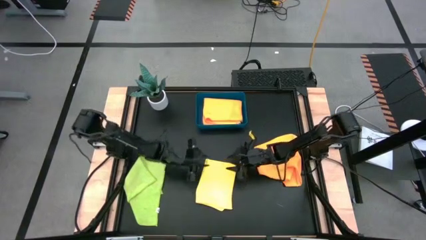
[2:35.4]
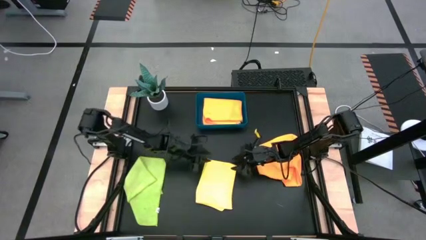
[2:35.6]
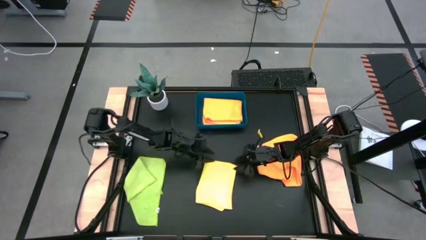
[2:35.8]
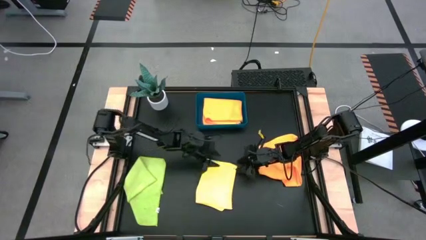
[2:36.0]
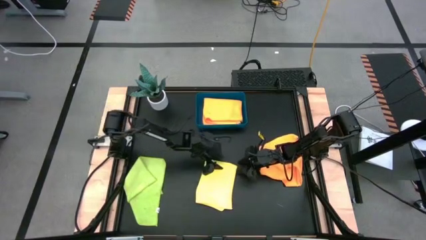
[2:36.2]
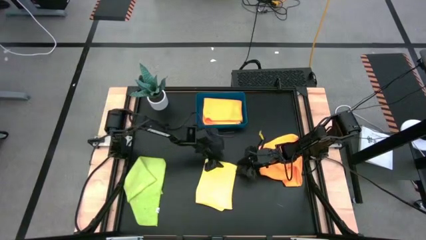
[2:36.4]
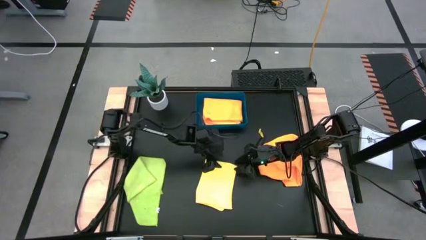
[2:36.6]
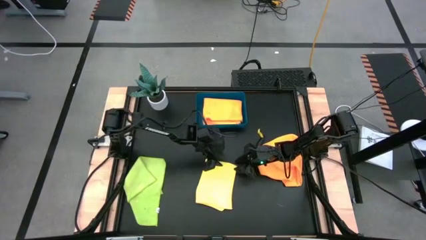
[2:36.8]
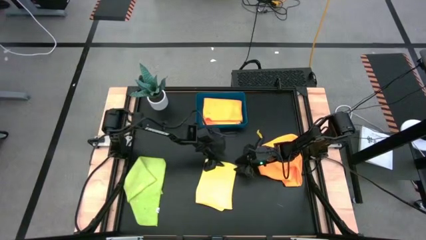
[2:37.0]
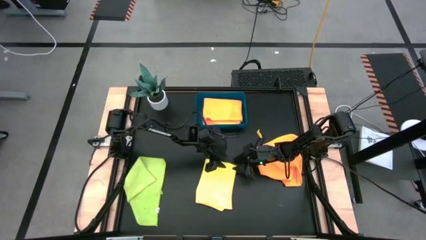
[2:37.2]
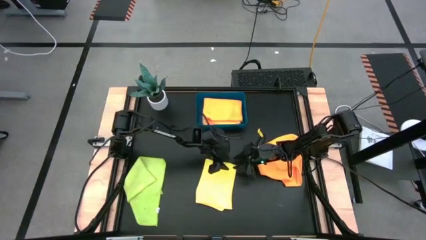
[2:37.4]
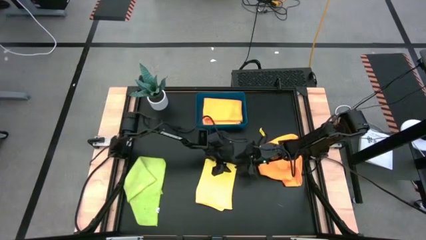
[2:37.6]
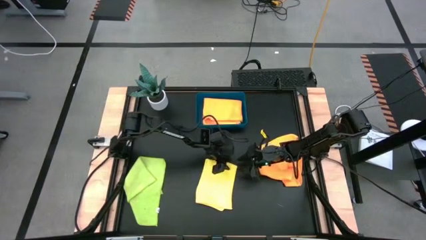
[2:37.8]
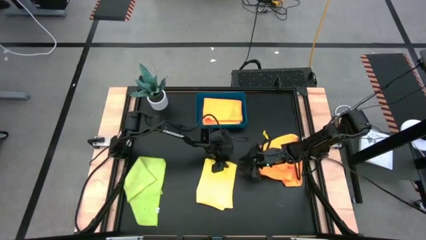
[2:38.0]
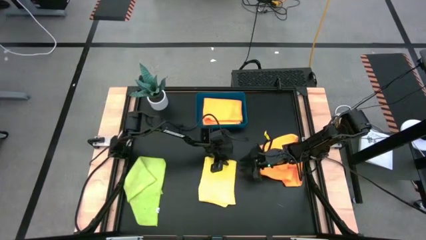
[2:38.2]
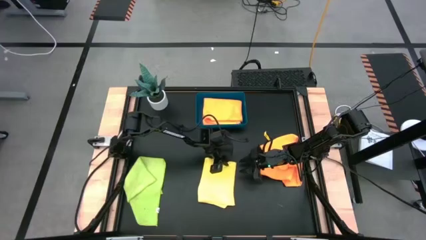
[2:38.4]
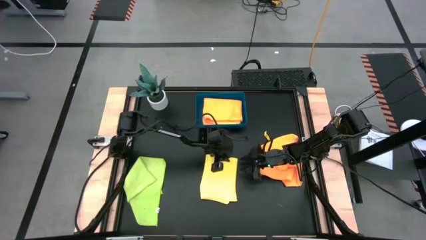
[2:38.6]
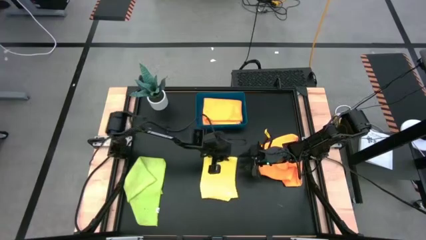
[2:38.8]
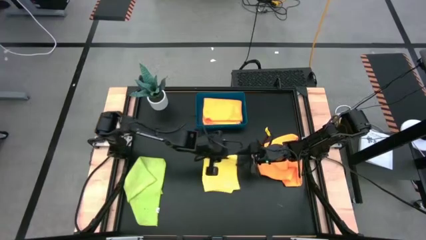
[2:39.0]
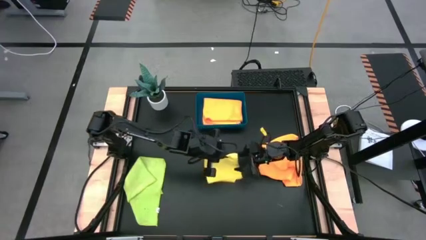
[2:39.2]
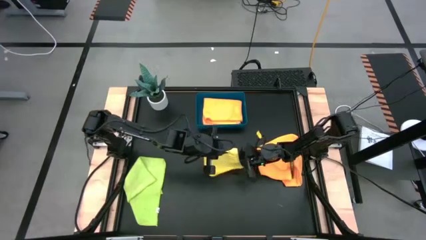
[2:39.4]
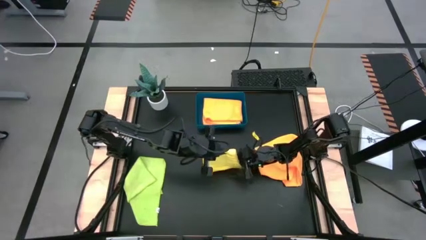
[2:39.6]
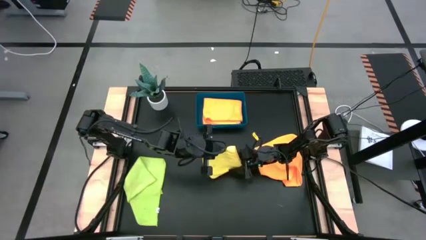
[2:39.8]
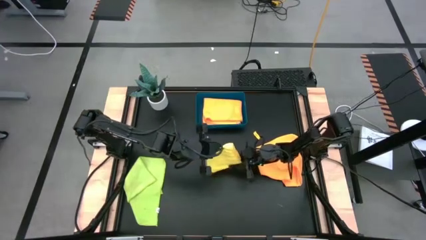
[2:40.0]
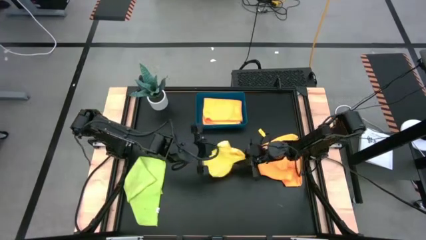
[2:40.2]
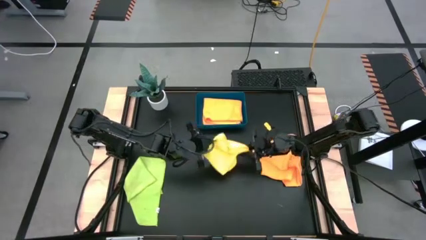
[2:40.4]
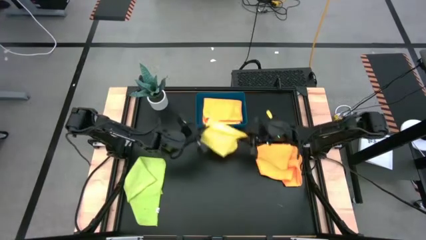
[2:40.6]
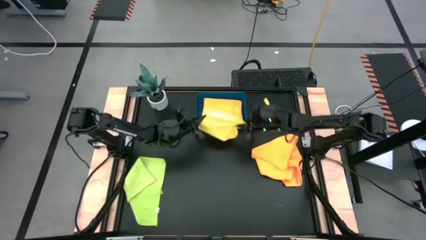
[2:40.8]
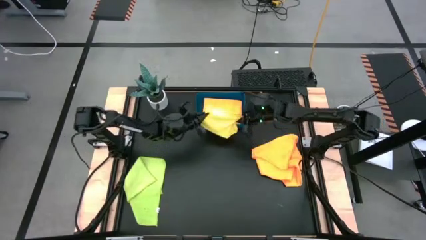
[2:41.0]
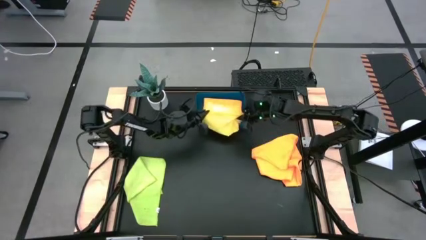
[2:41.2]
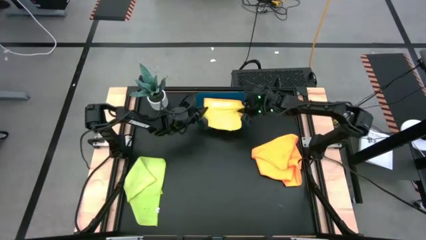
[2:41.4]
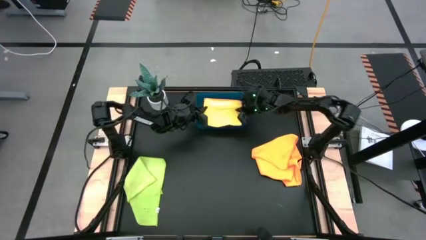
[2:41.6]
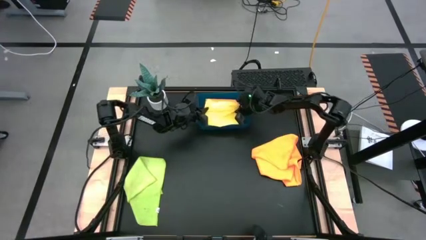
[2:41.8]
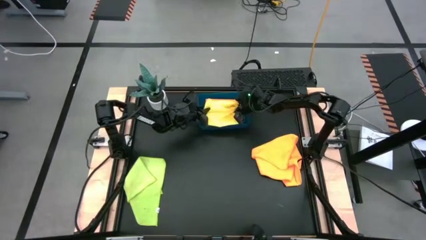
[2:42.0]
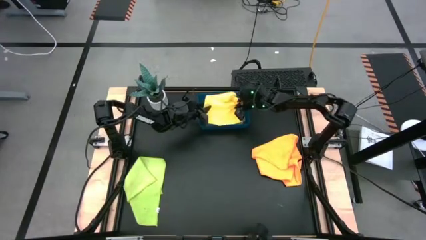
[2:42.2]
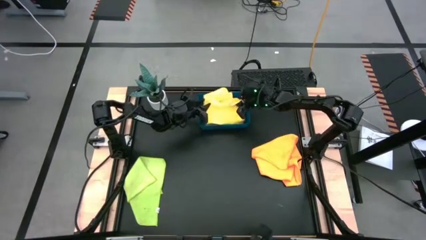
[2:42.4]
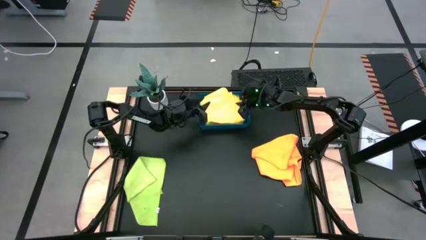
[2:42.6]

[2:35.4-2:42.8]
Task: Fold microfiber towels
Put the yellow microfiber cloth into the blue bin

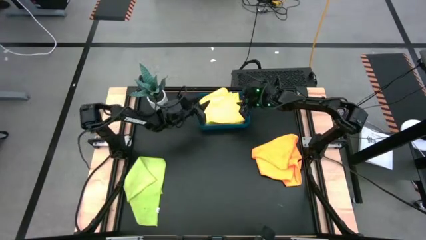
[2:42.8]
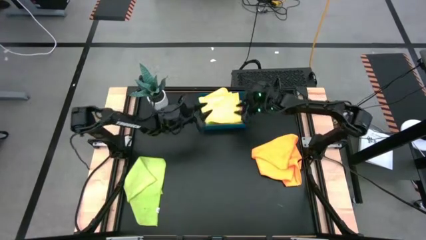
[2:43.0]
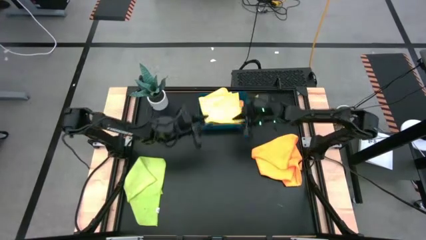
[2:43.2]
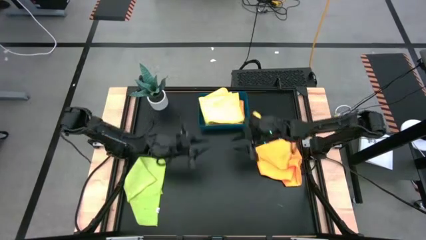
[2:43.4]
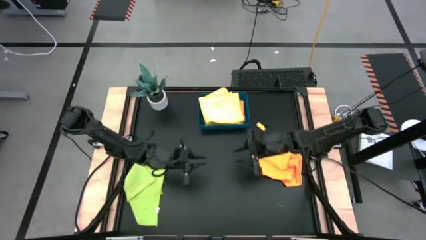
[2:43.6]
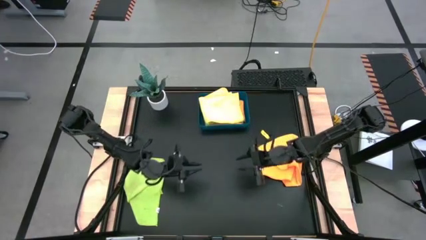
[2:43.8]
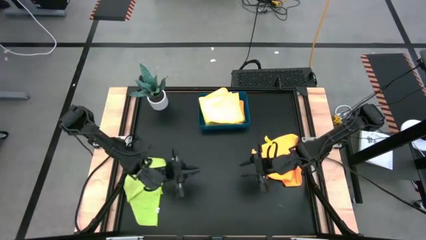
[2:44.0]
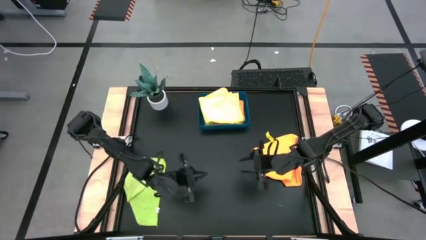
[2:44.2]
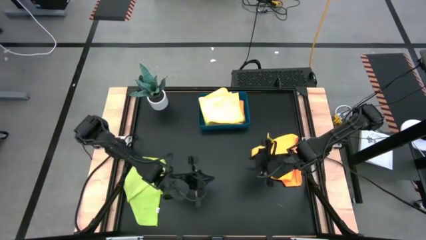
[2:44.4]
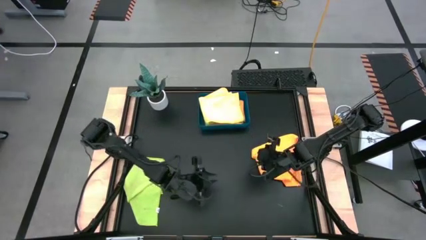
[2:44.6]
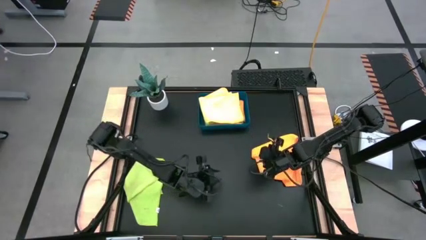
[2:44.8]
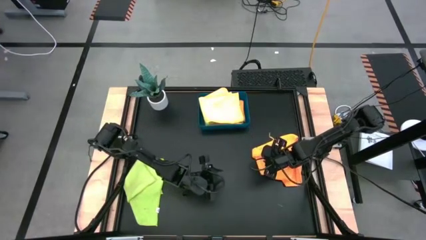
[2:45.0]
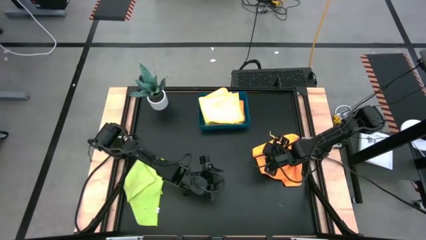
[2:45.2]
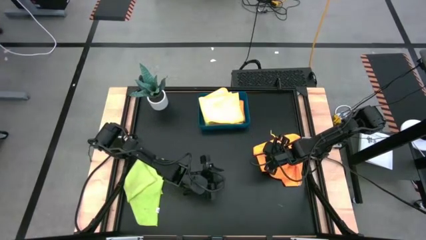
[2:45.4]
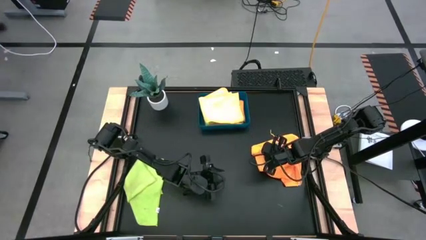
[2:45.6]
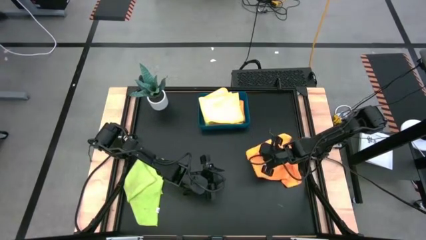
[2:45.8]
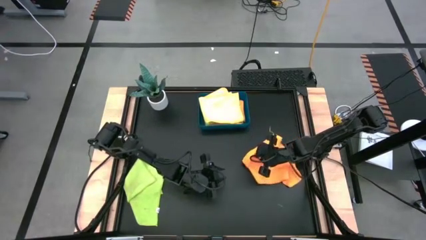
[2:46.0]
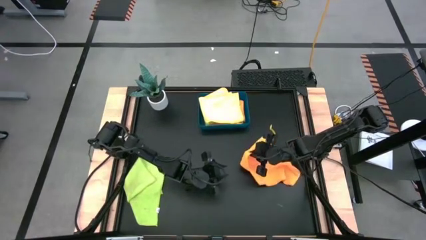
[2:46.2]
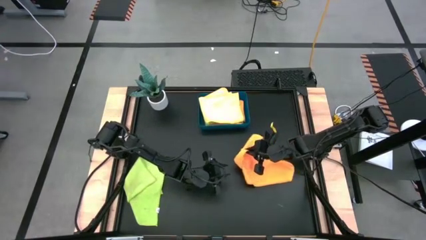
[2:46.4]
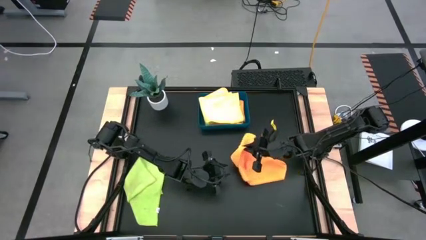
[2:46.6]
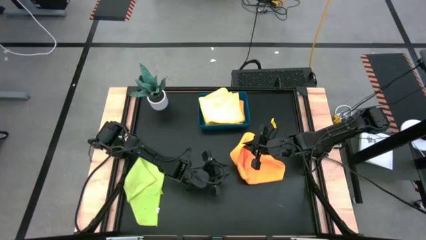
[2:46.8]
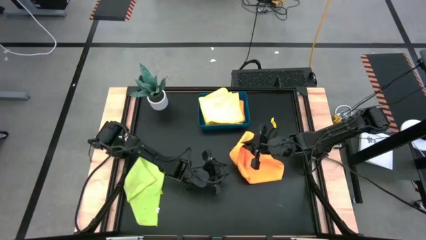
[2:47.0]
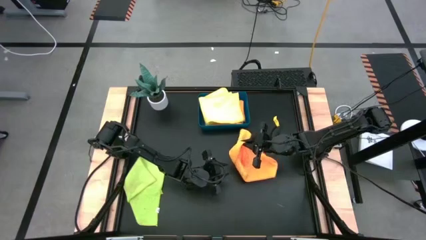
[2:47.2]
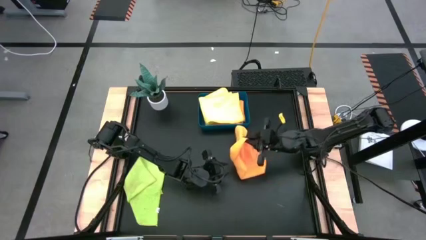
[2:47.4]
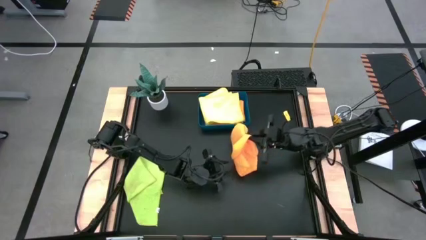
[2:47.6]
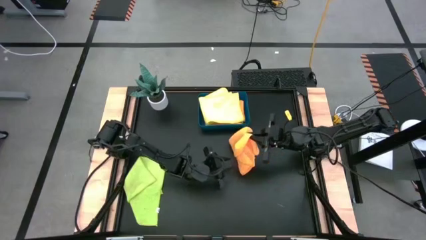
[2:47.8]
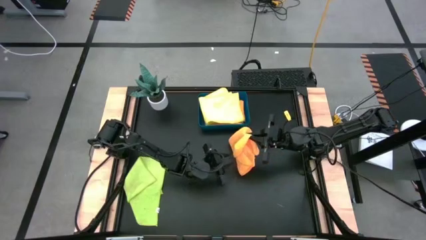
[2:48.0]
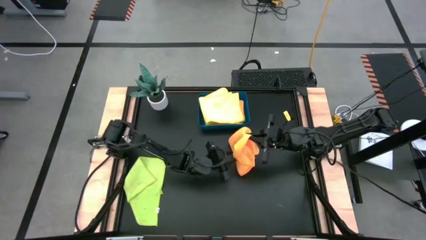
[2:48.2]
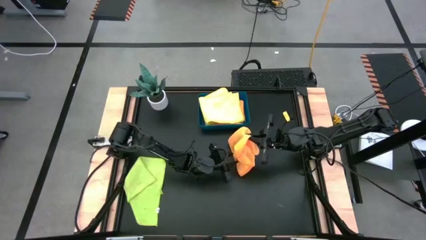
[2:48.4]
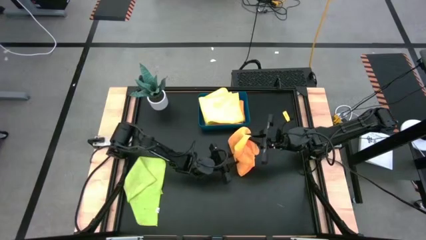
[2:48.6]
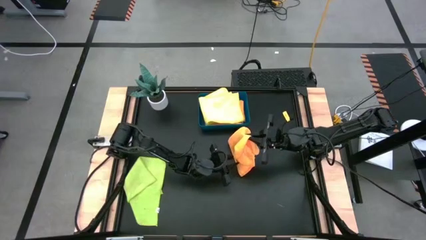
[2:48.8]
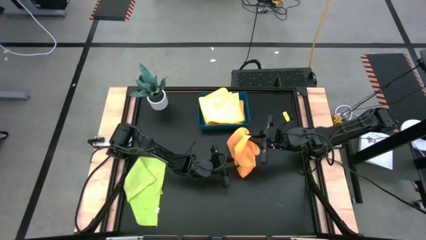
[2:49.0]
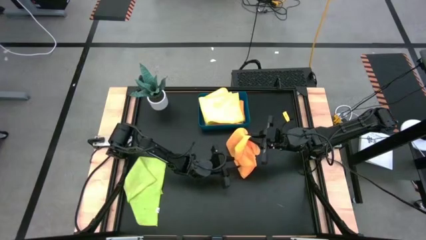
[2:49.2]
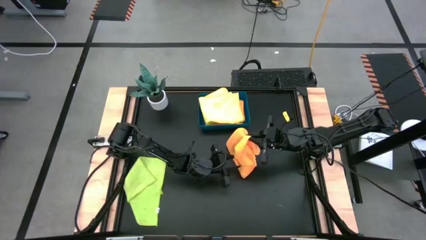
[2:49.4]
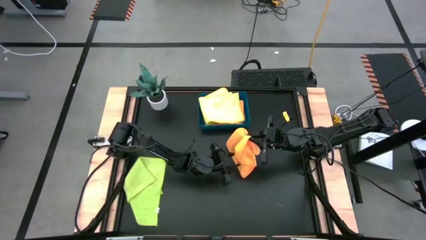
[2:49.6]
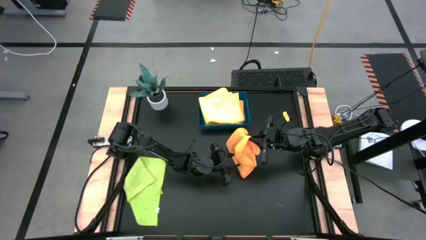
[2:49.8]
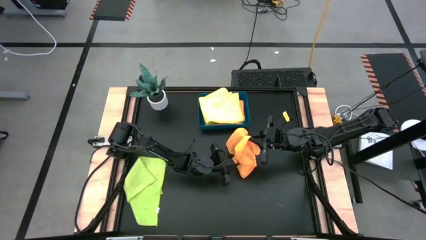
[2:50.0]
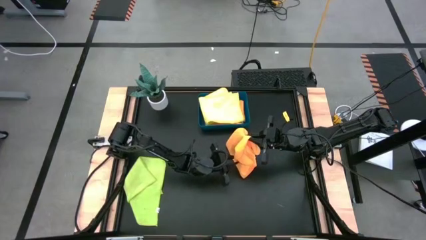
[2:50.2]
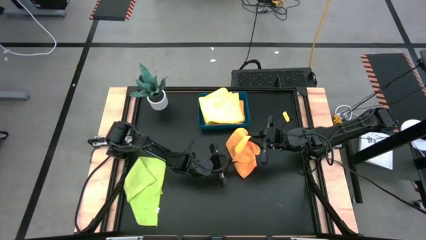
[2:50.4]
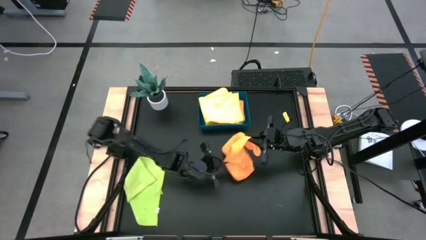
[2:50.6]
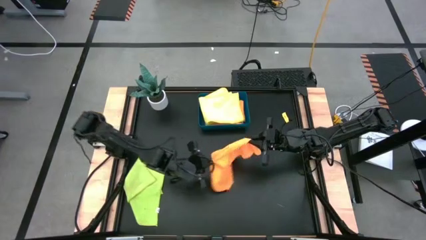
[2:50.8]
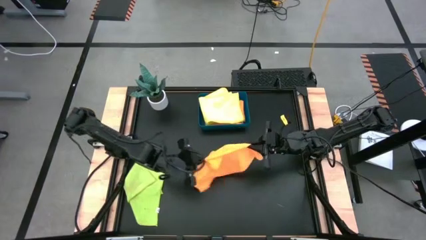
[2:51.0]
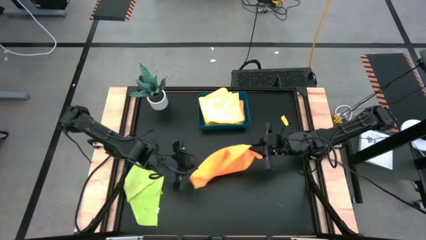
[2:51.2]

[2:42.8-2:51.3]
Fold the orange microfiber cloth
